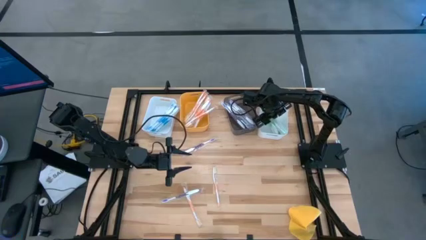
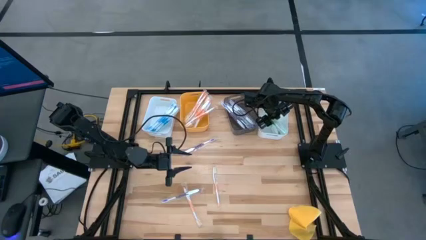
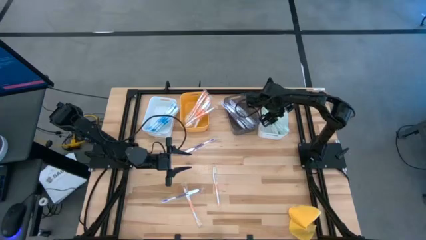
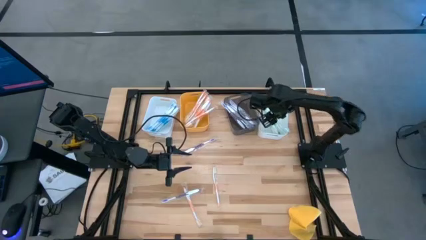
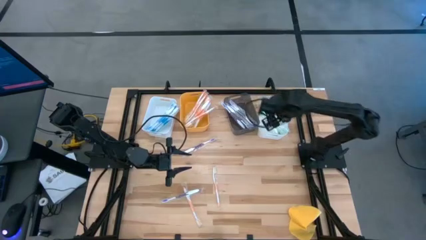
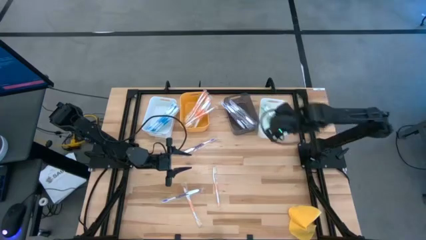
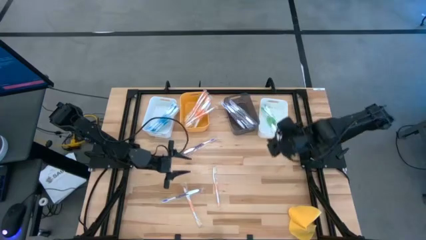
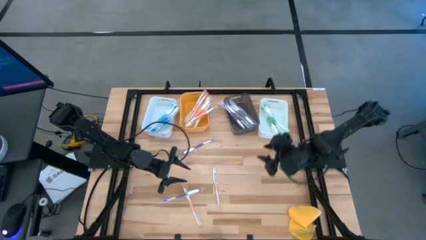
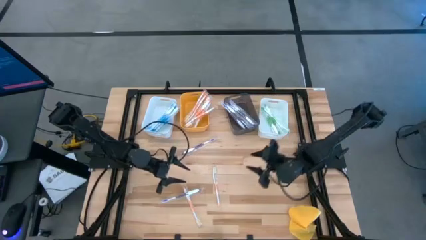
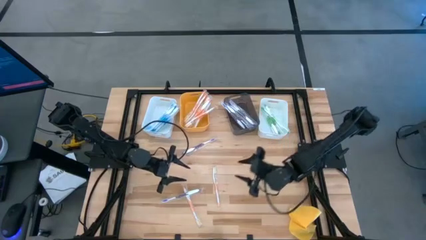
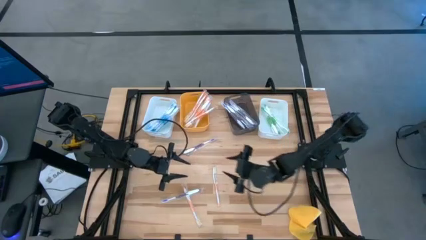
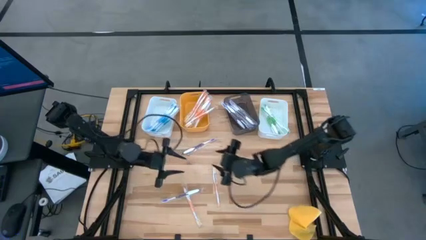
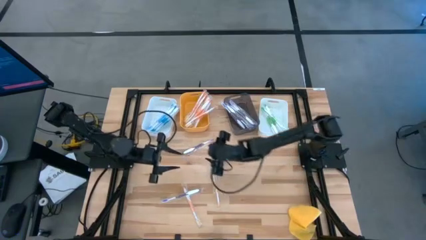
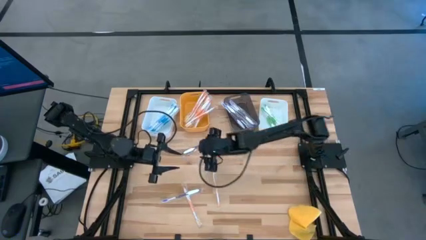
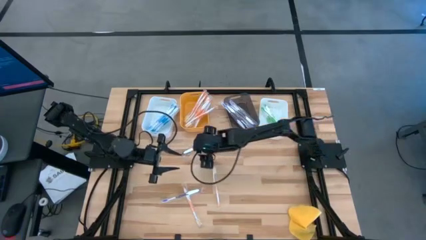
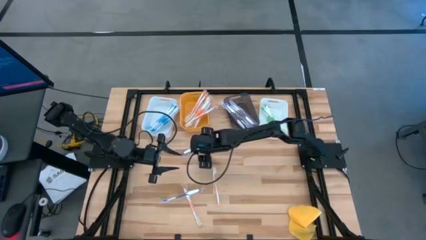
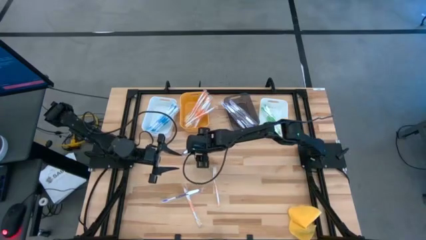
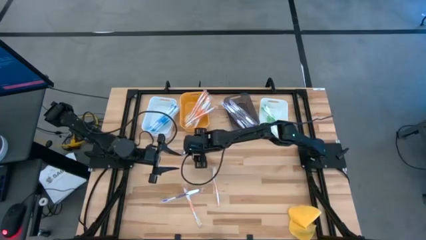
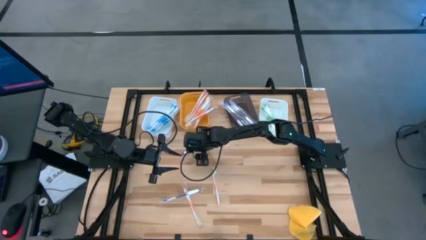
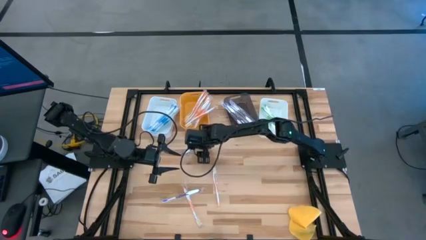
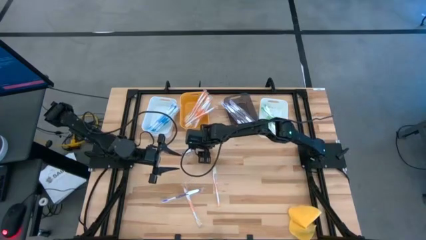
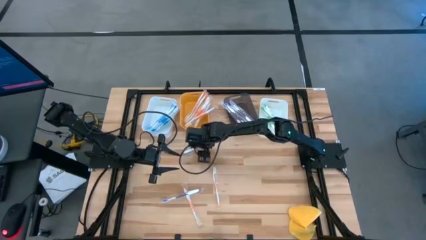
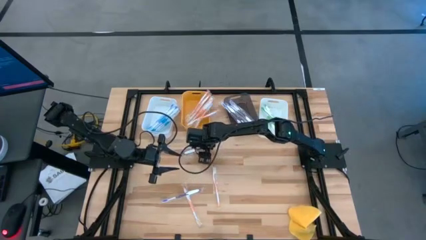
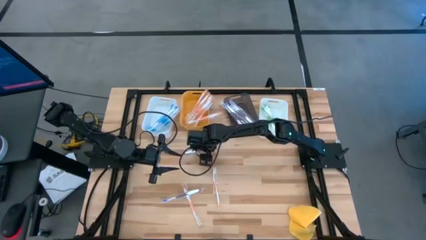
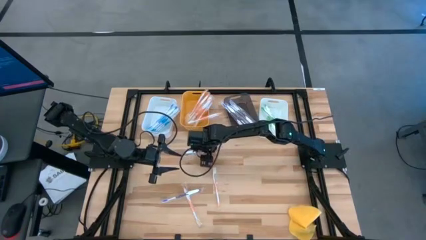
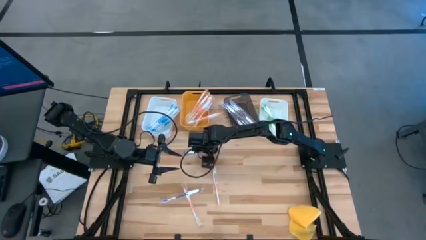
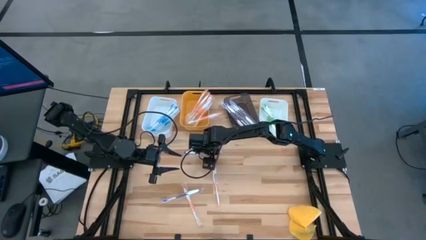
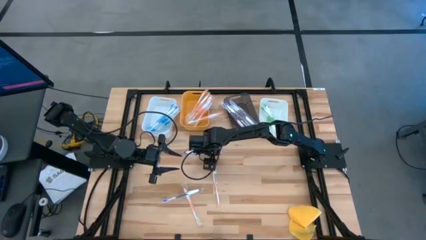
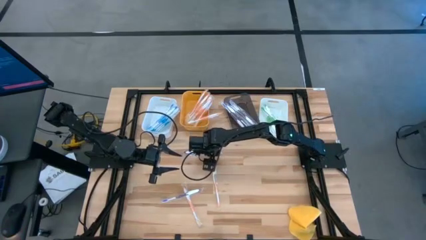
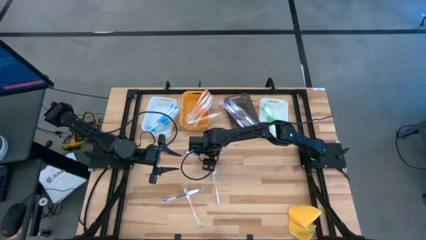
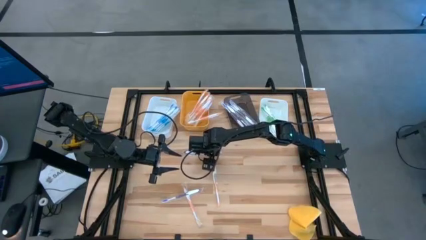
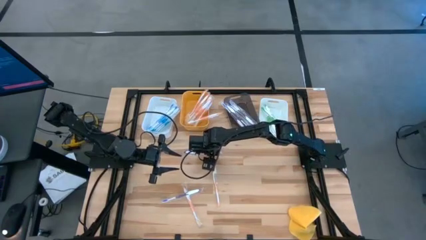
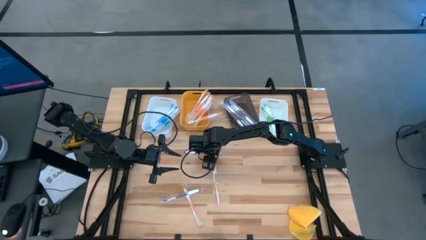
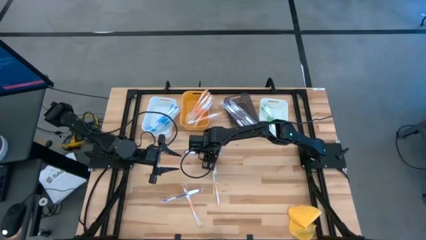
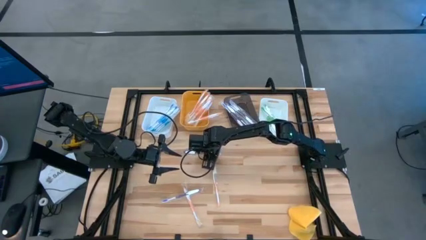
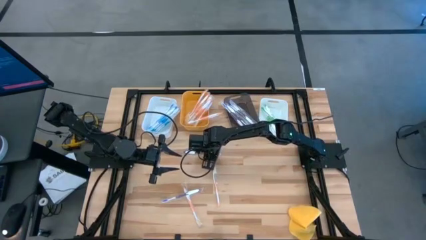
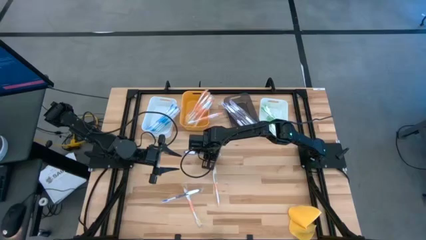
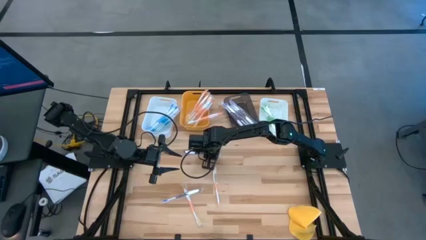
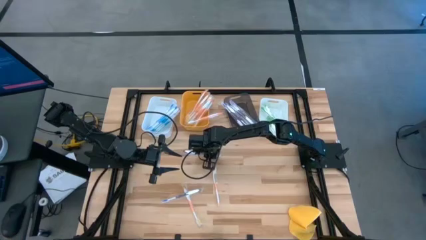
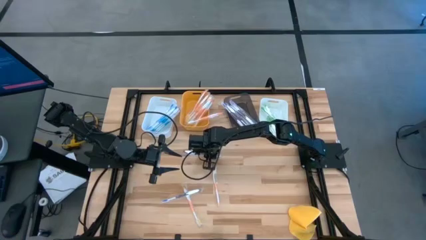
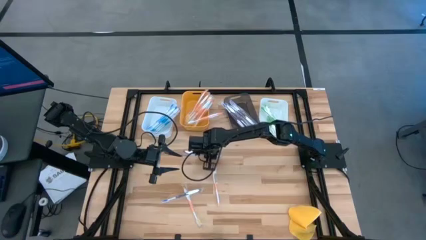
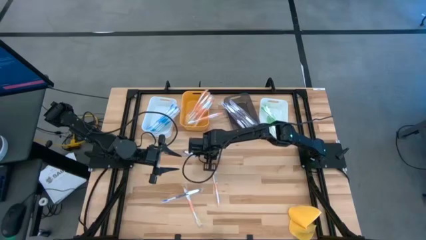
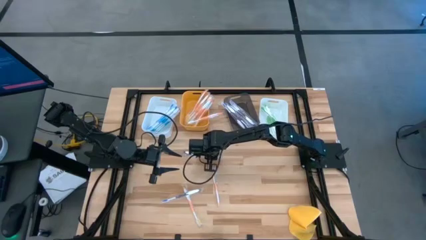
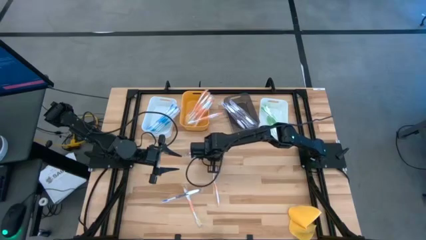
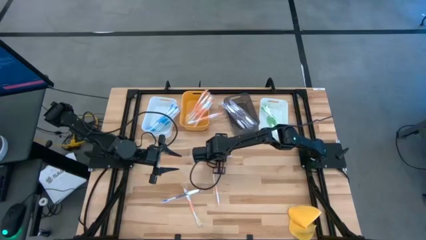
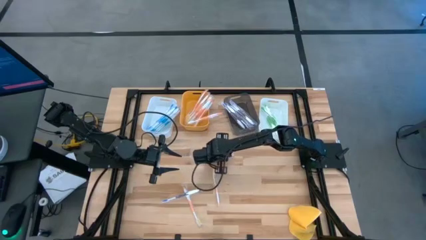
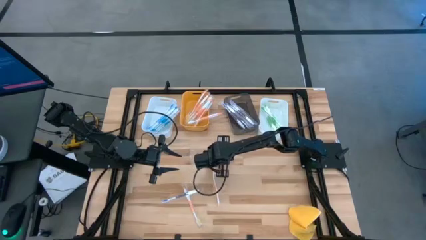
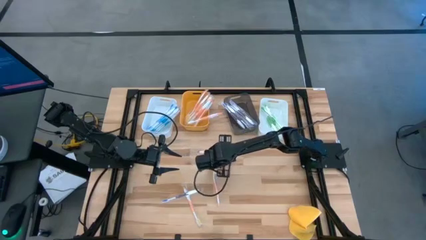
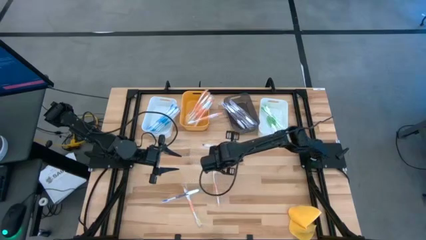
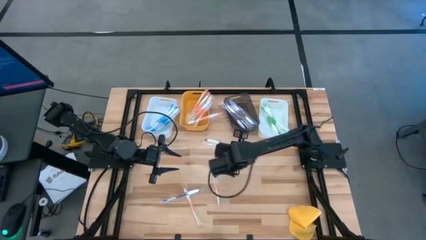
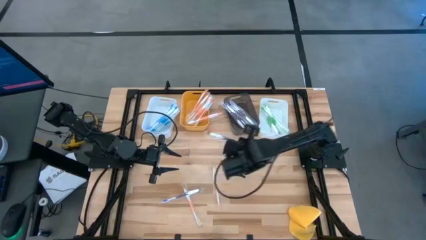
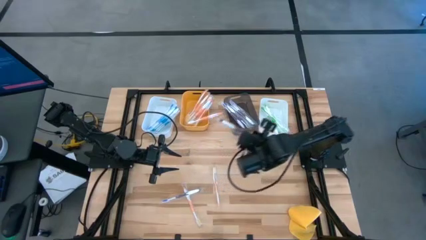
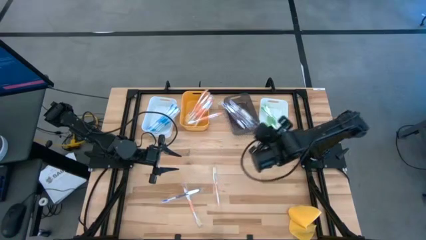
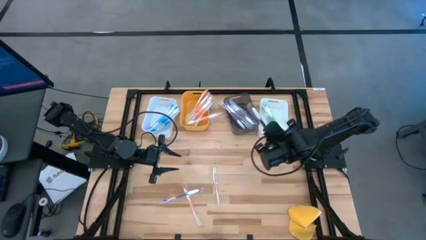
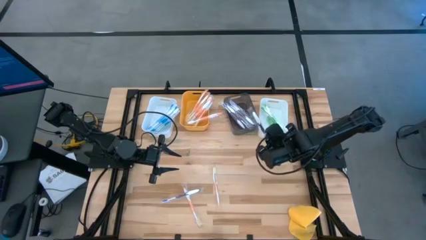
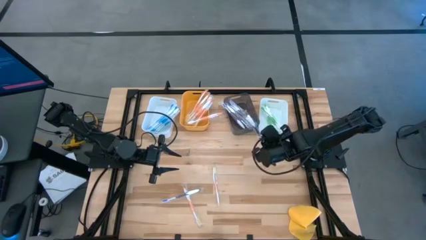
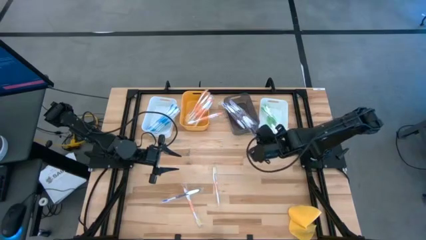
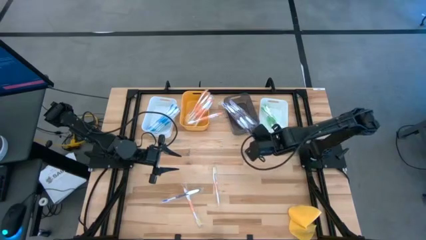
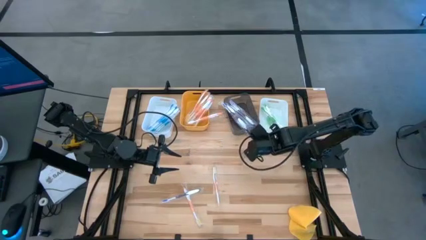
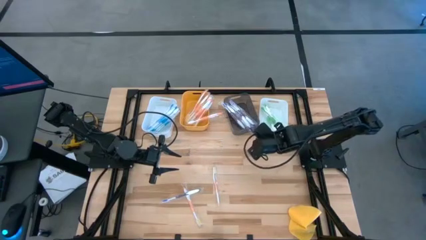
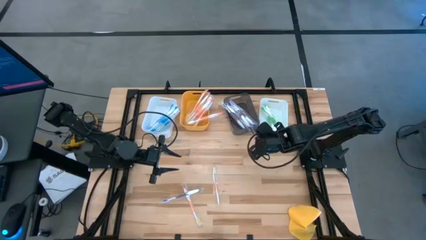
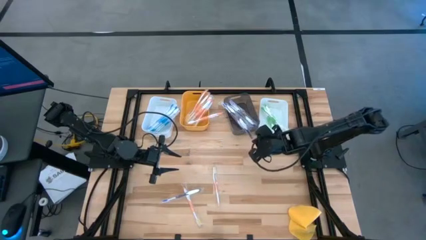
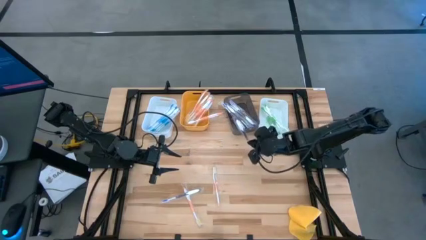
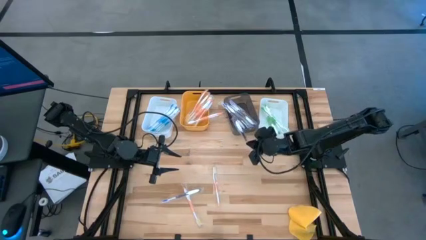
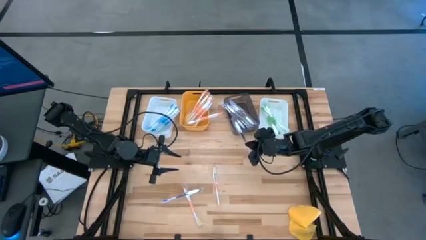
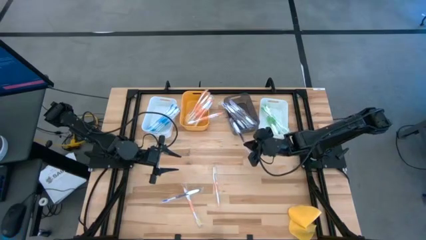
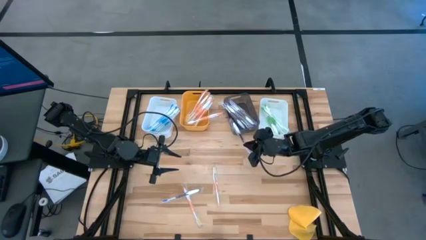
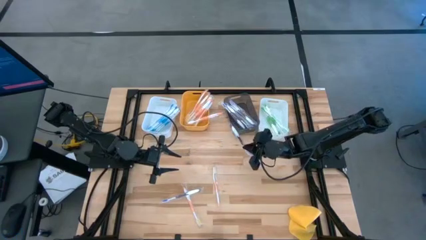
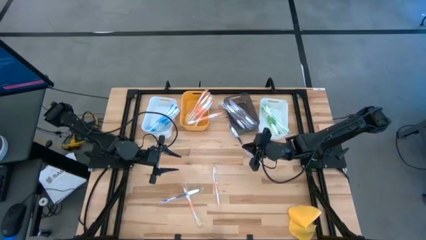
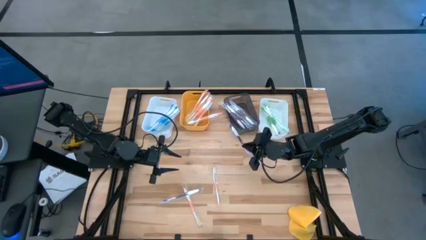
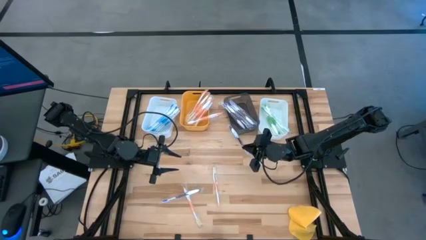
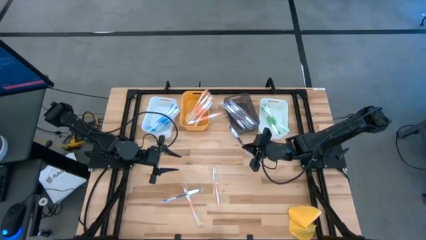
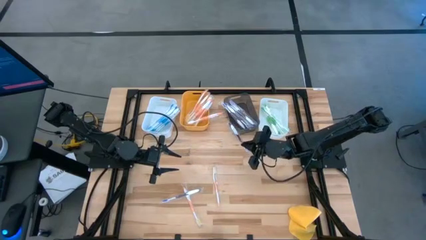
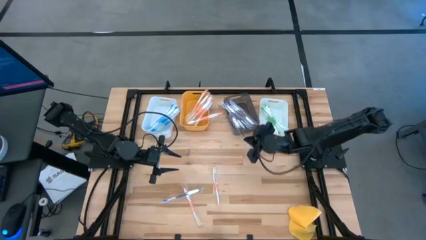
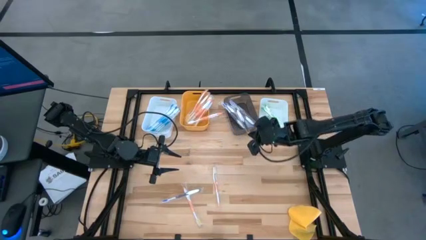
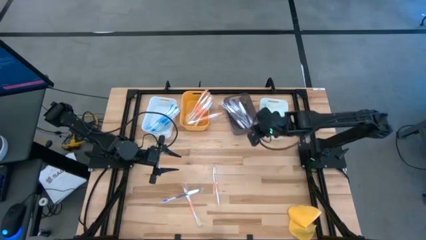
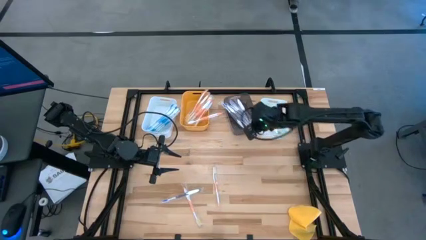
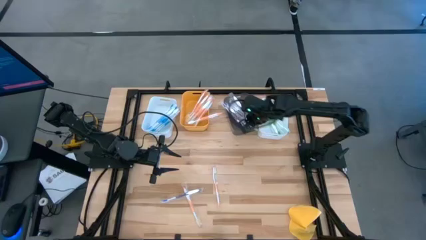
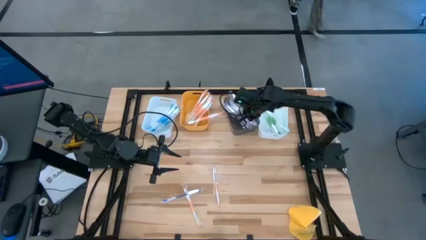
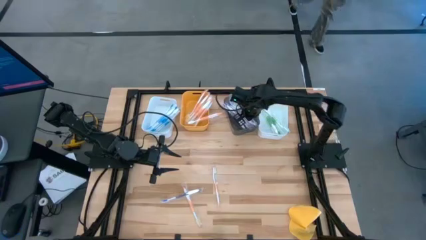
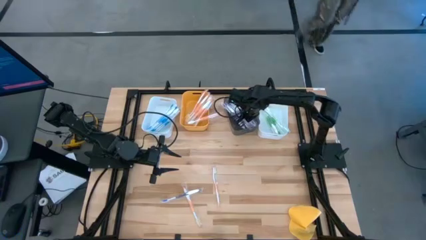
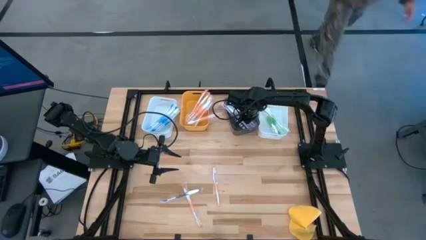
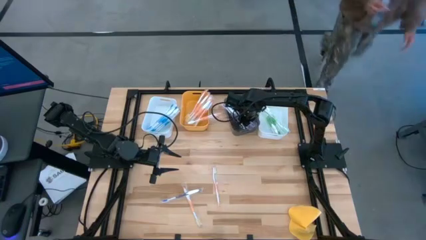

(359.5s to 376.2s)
Task: Pick & Place Toothbrushes
Put the violet toothbrush into the gray bin
